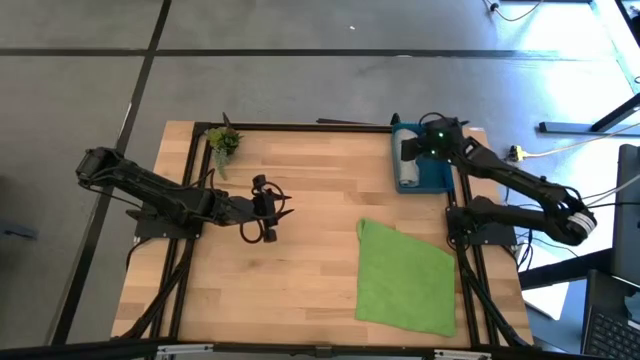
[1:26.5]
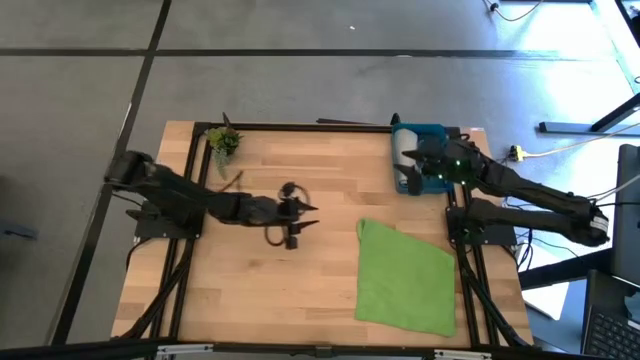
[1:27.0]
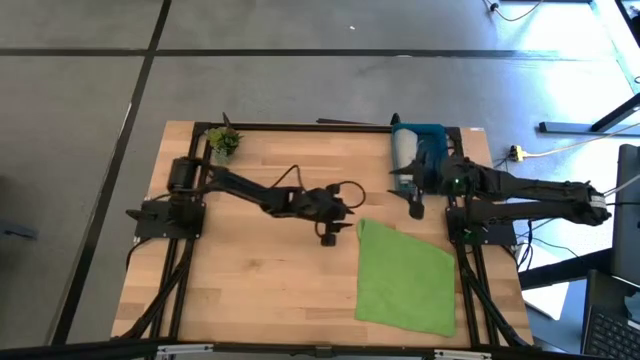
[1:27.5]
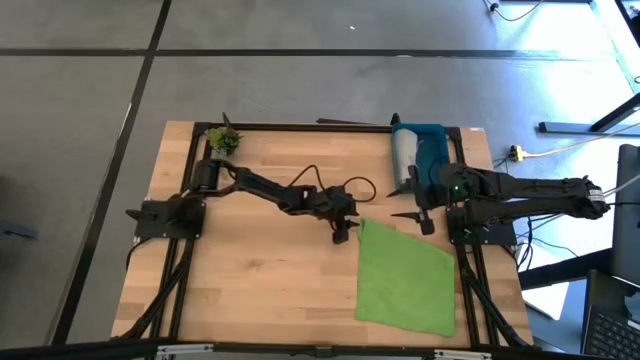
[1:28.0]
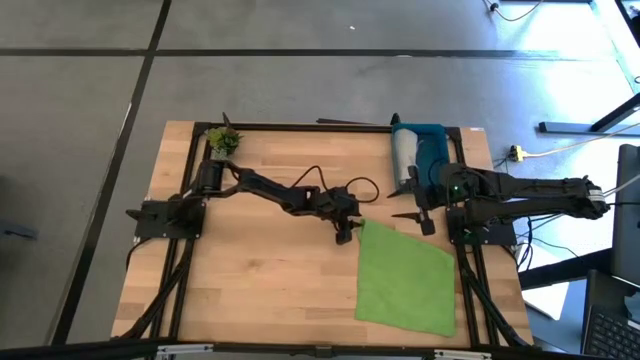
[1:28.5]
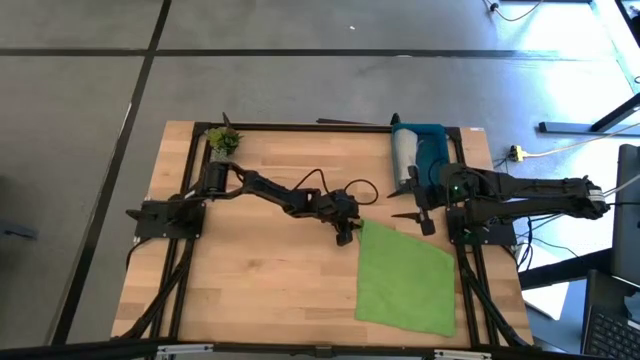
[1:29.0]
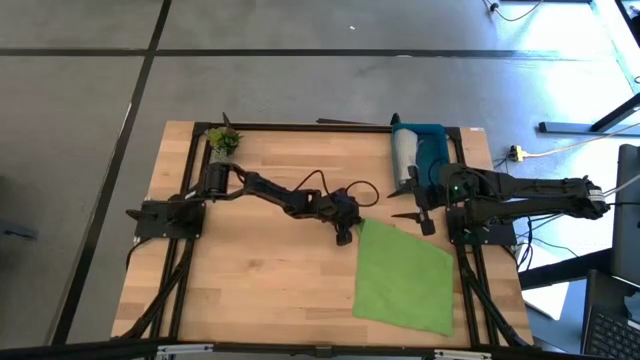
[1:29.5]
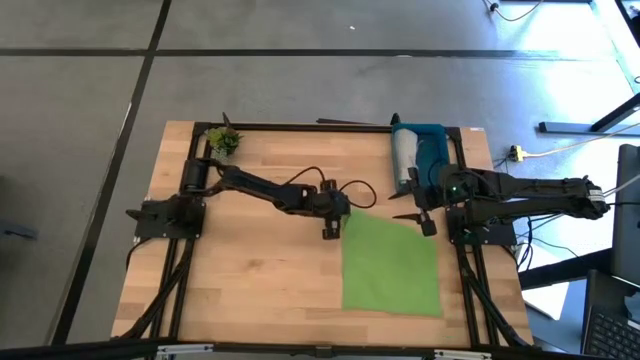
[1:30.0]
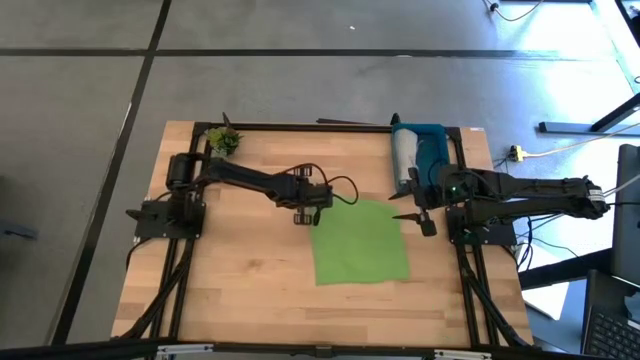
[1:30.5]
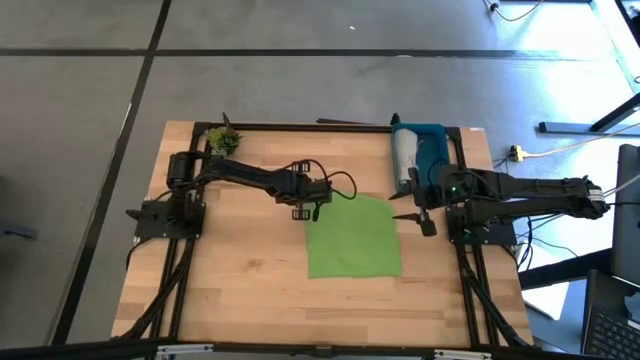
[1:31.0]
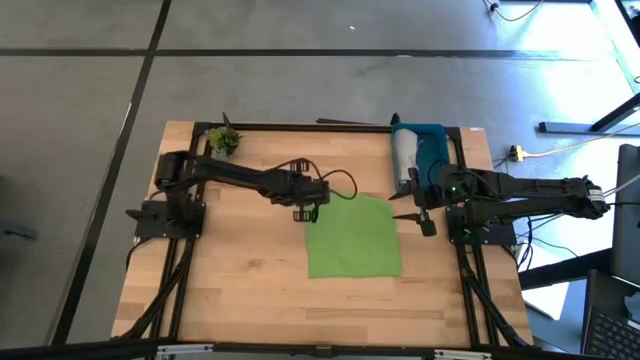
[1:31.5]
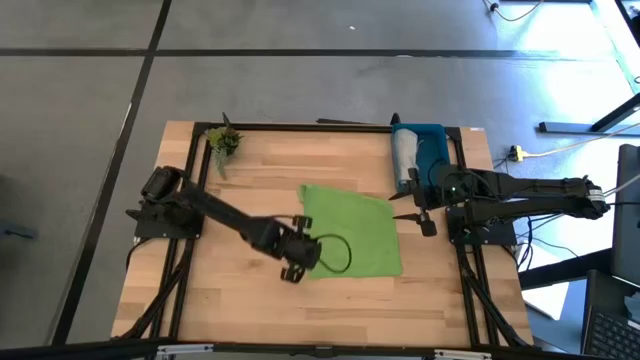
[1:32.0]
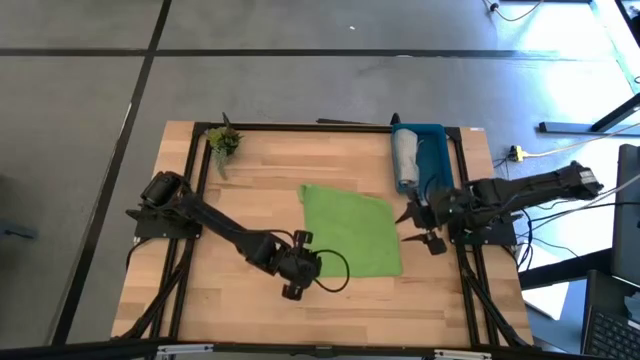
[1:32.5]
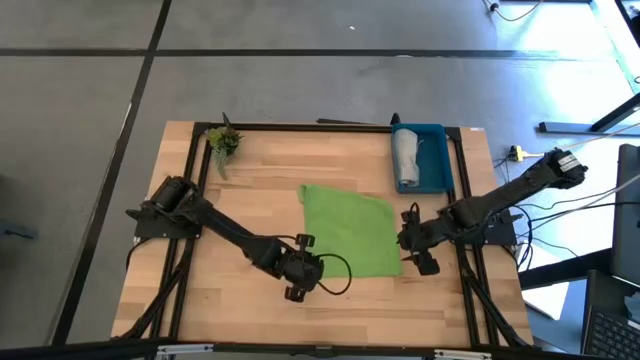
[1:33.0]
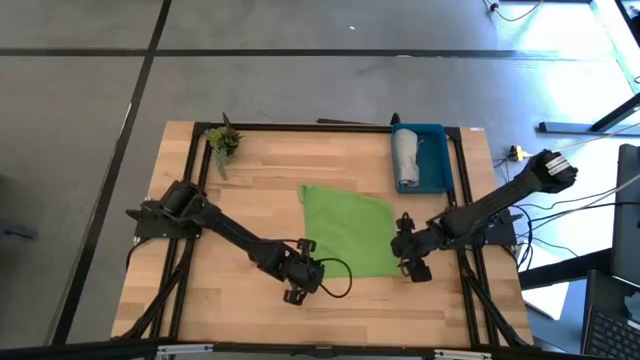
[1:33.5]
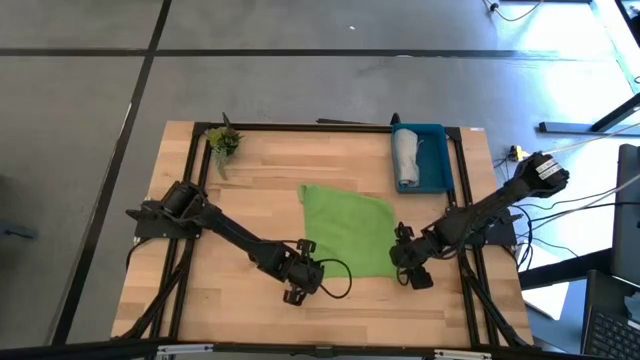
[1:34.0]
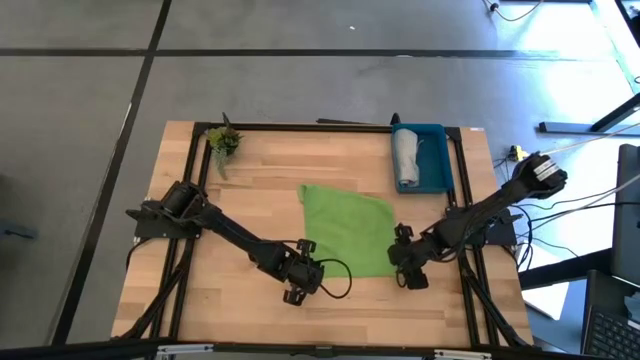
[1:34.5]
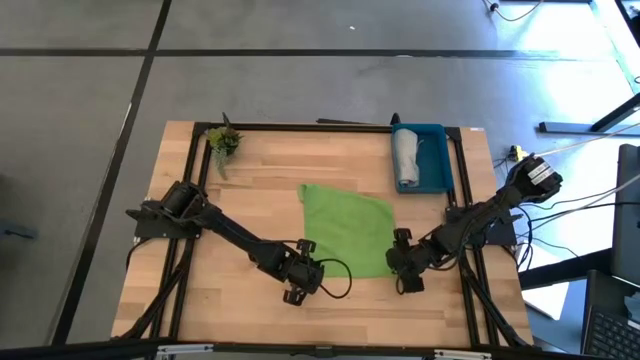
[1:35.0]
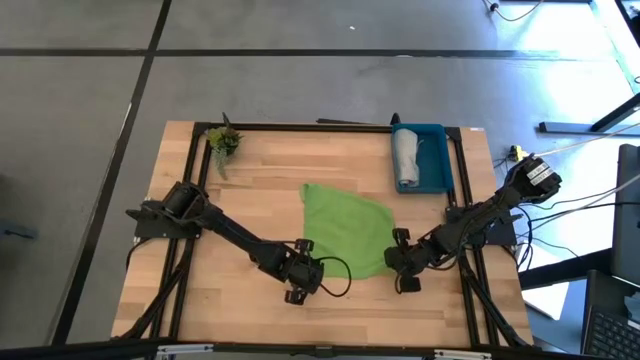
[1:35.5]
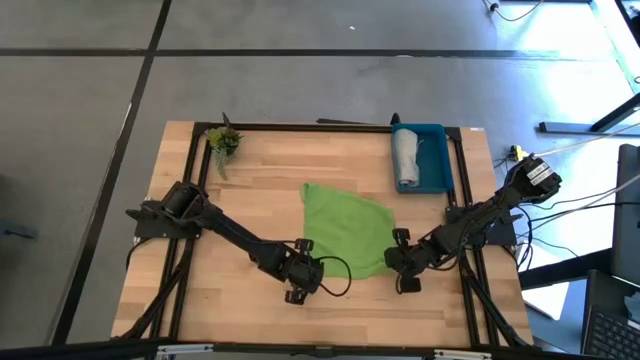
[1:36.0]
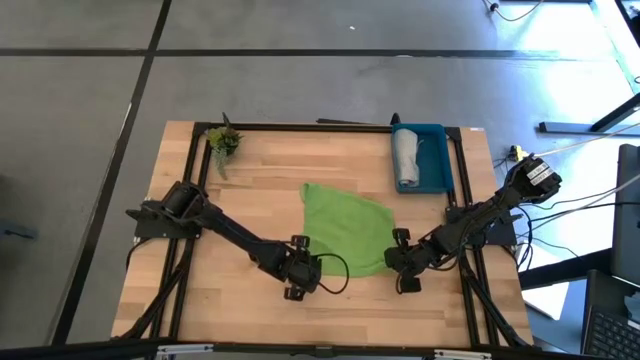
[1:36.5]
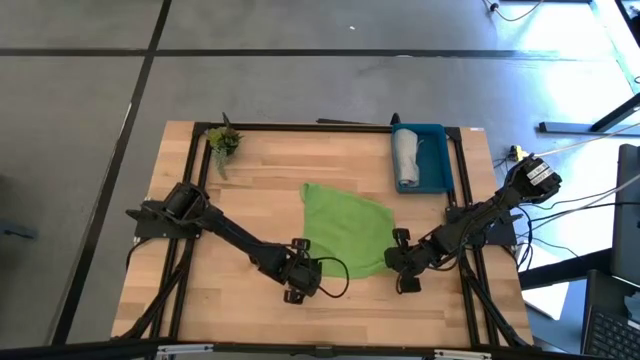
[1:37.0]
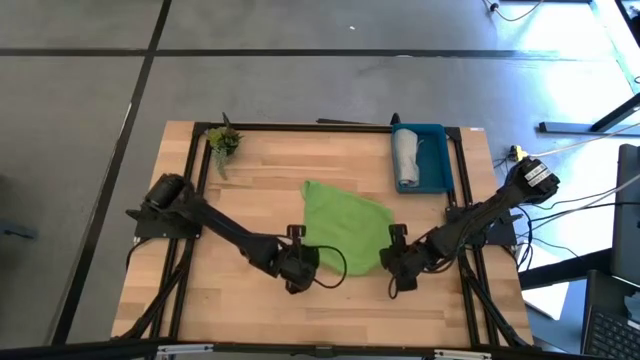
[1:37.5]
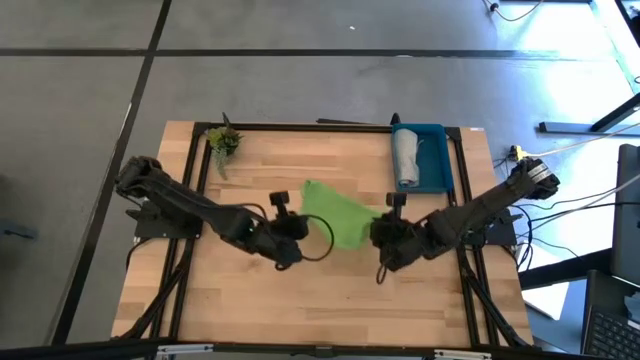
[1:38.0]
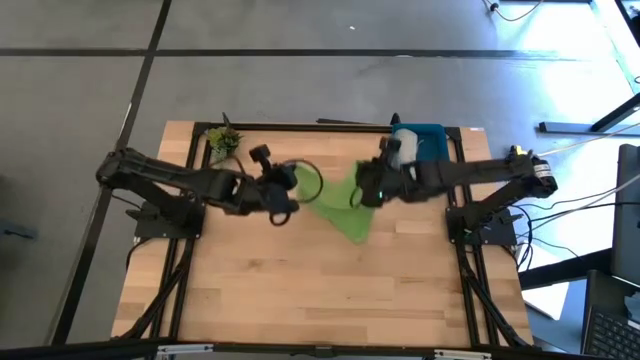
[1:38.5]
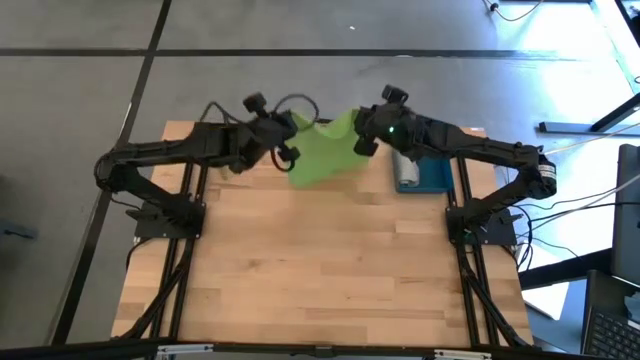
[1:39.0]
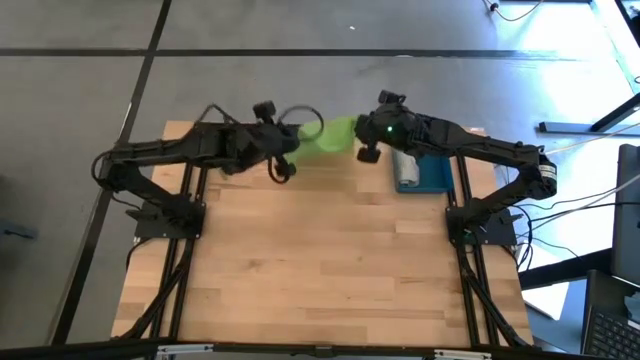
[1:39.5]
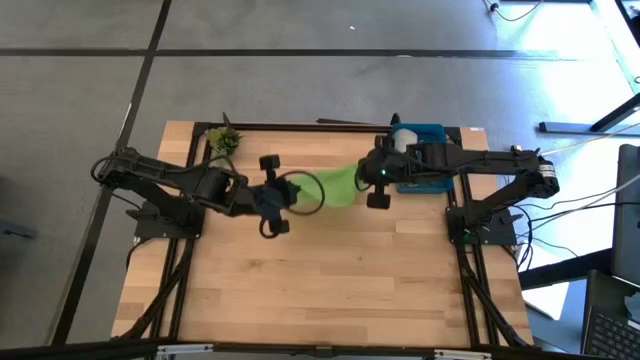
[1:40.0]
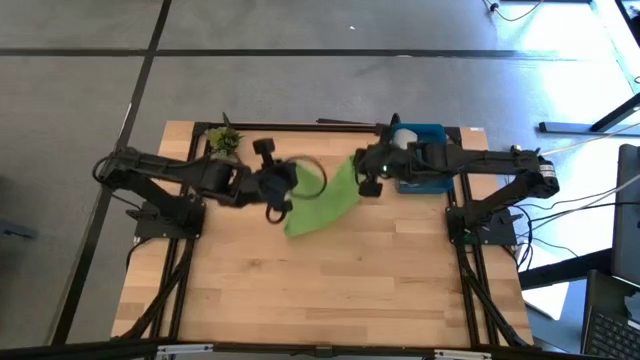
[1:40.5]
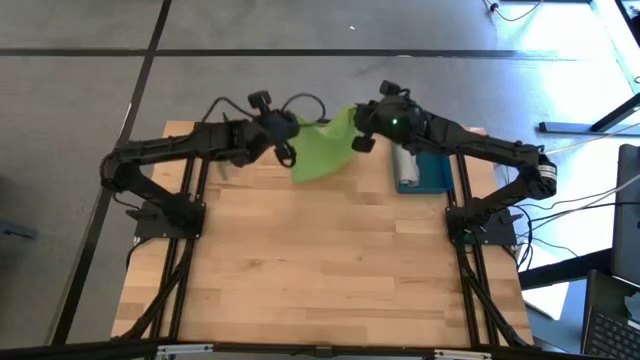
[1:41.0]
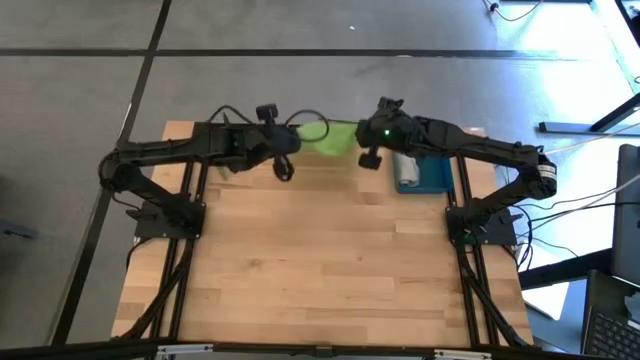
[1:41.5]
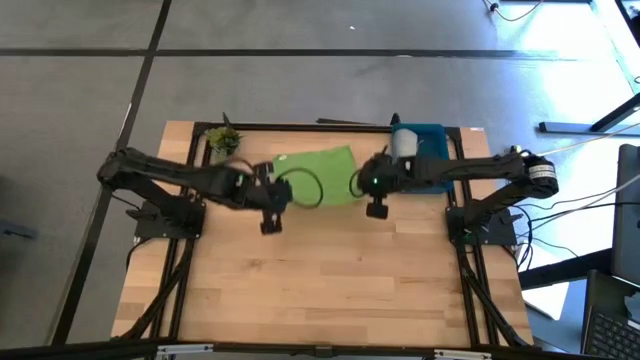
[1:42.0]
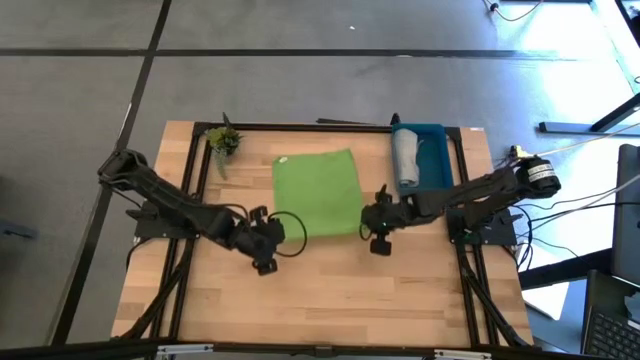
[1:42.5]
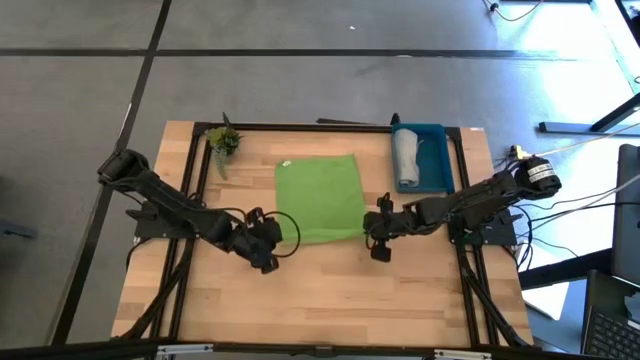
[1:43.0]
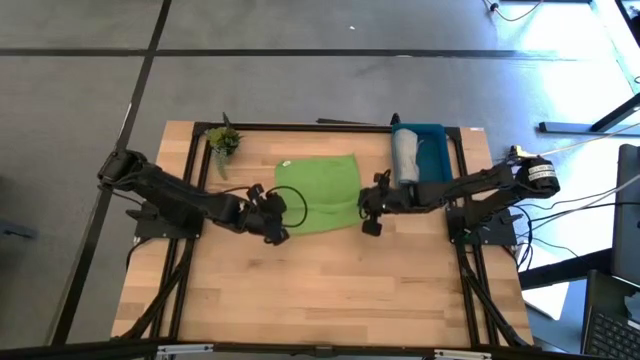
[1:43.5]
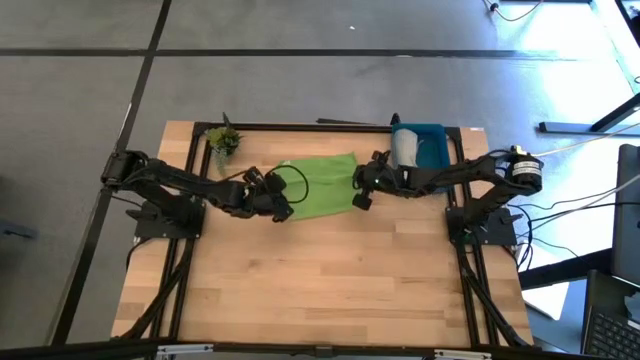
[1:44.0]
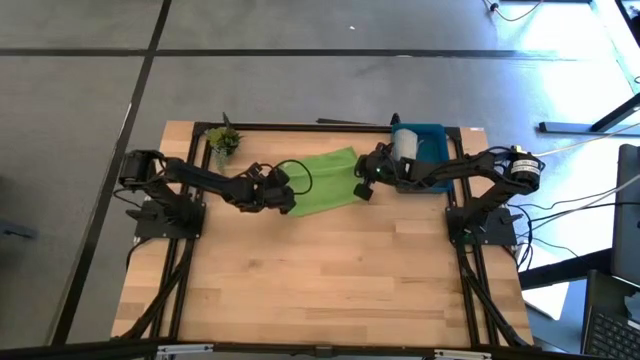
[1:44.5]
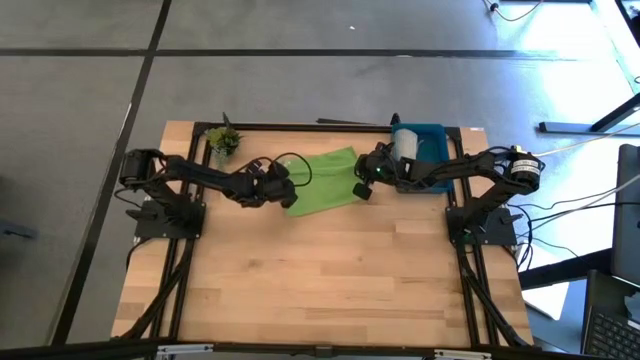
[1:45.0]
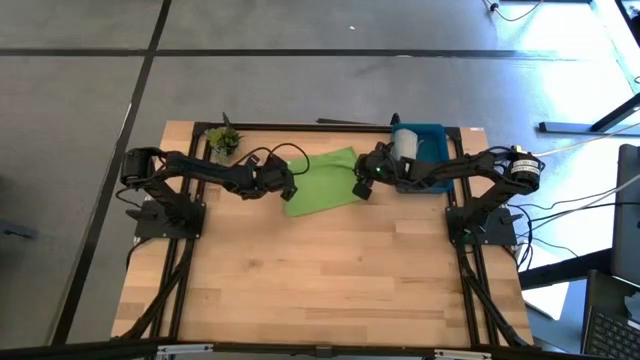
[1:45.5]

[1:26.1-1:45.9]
Task: Roll microfiber towels into tight, uniform cylinder then place into a basket
Roll the green towel

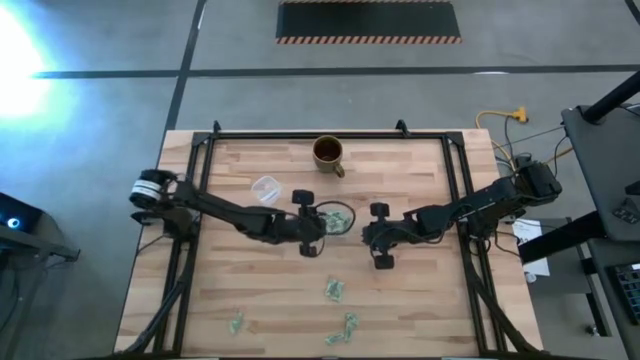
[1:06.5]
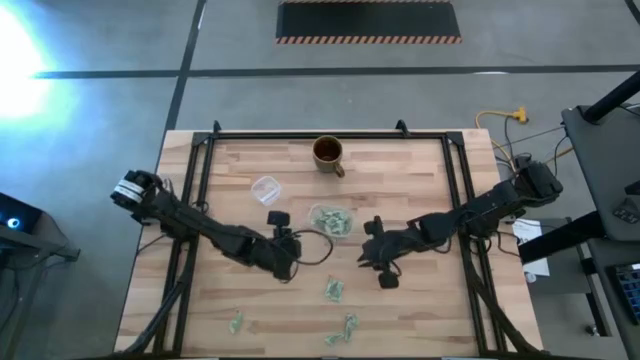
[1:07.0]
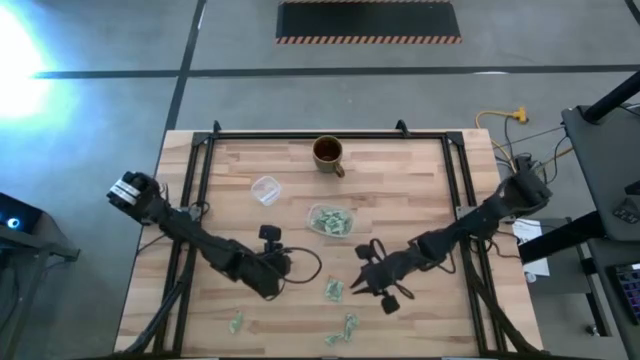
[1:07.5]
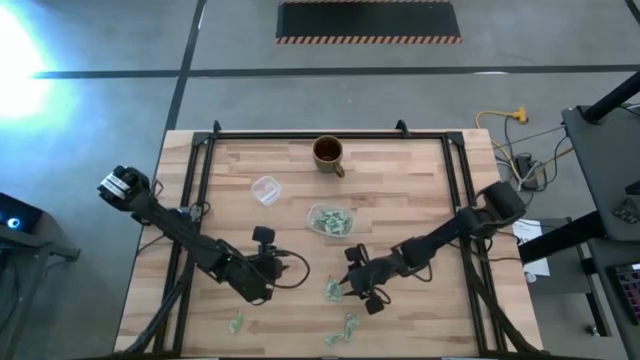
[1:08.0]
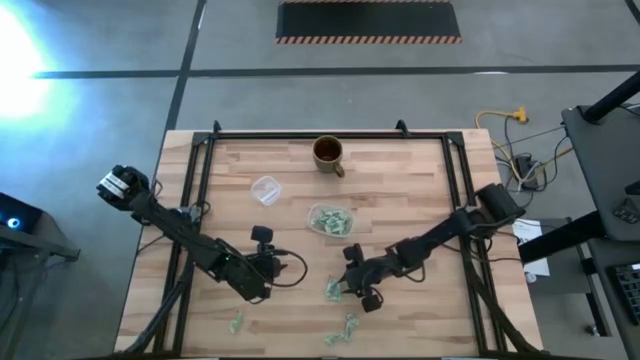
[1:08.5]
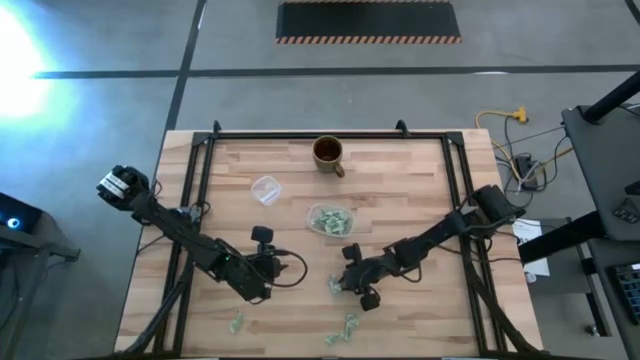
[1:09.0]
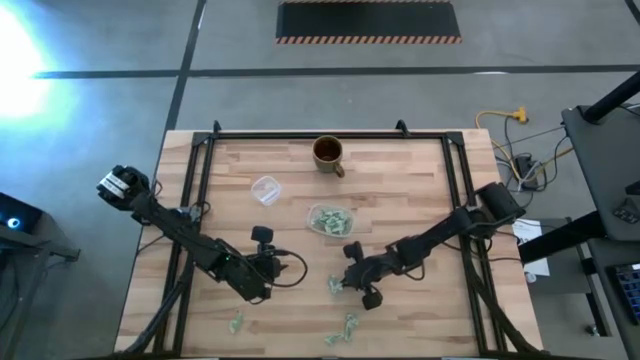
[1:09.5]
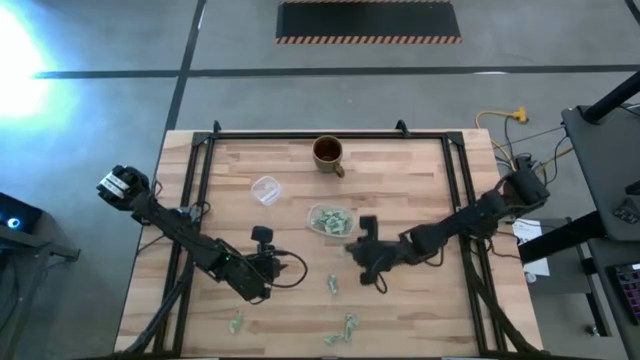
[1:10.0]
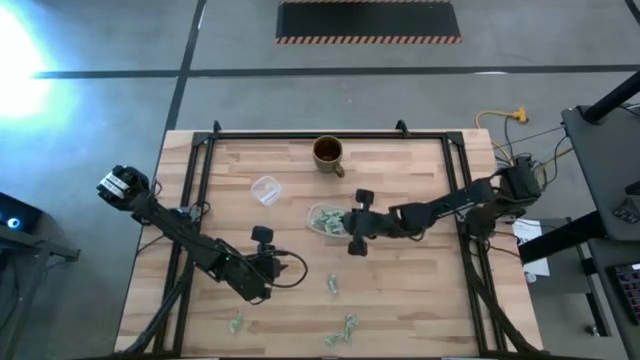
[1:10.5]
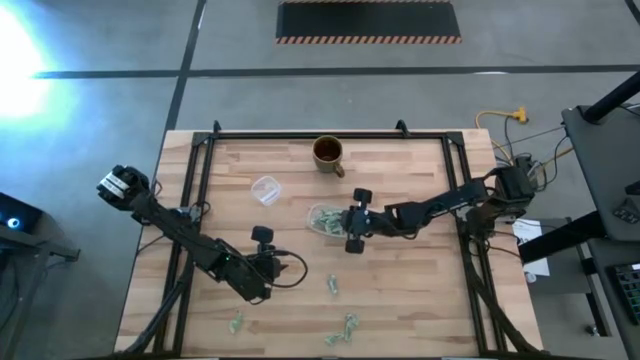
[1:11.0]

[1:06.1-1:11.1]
Task: Pick and place Stevia / Truvia into bins
Put the green stevia packet into the transparent container
